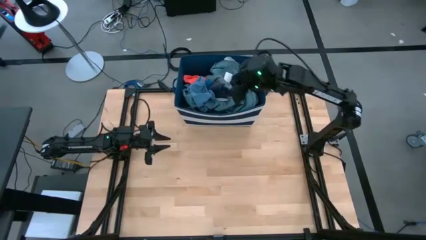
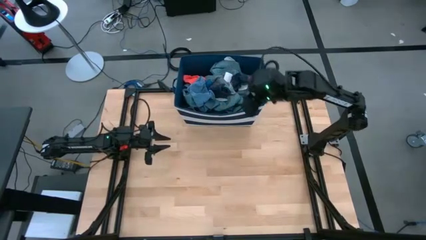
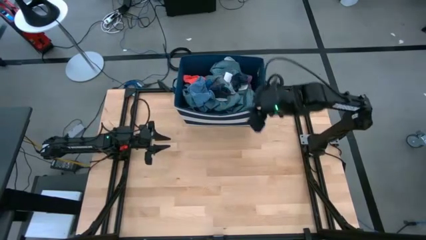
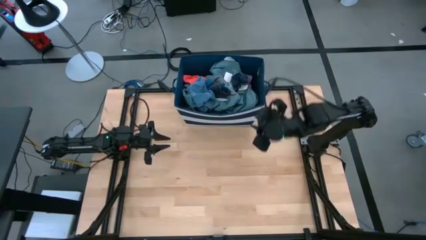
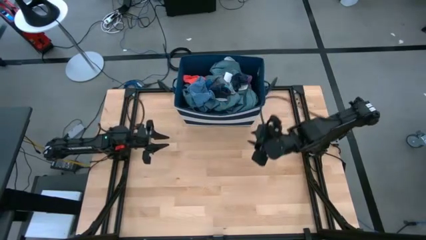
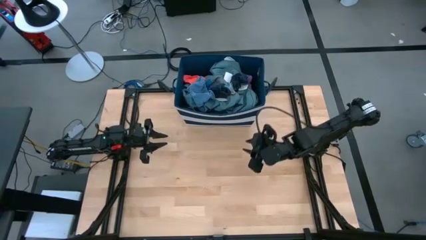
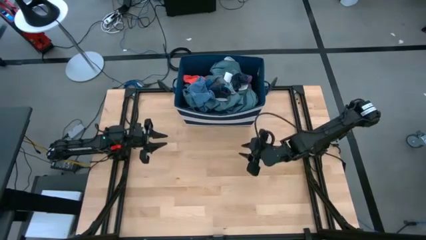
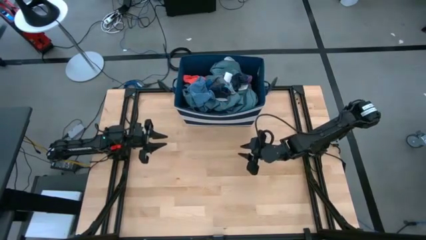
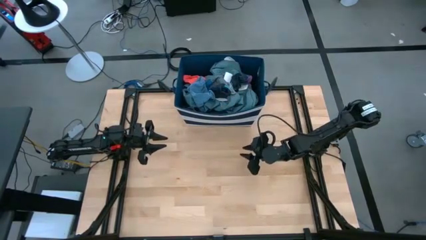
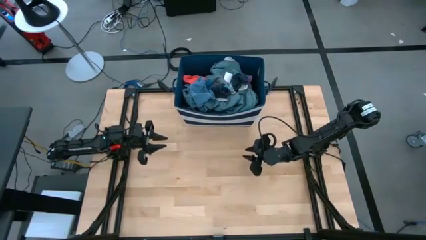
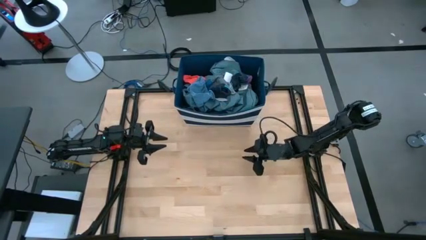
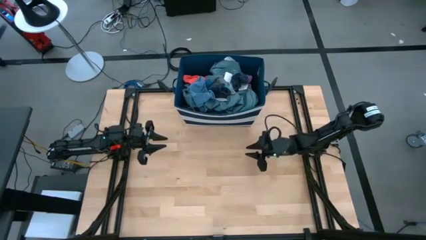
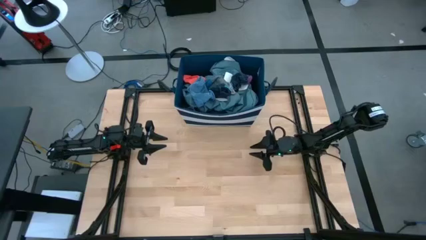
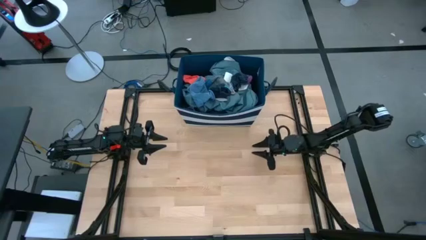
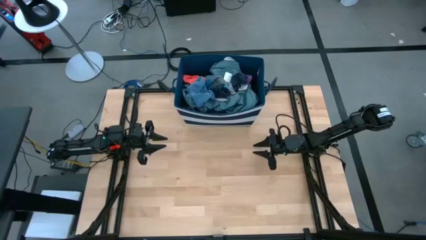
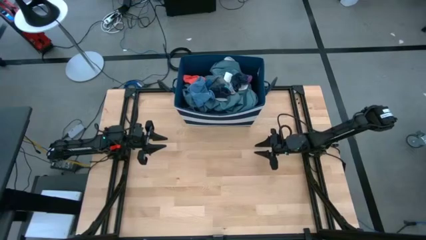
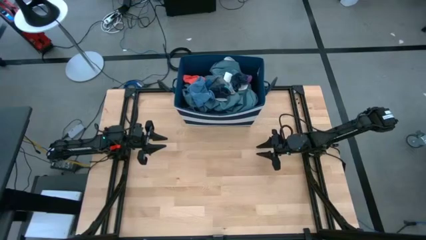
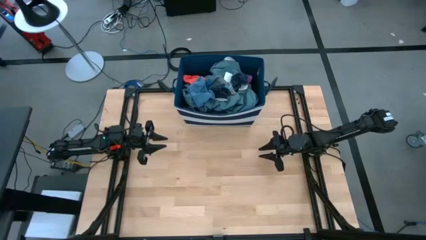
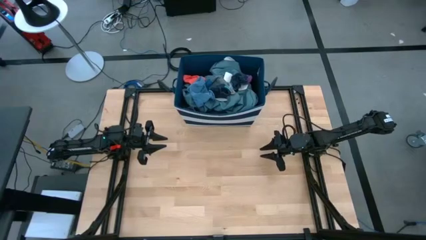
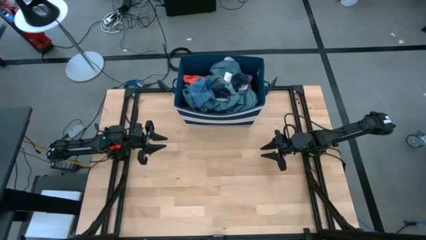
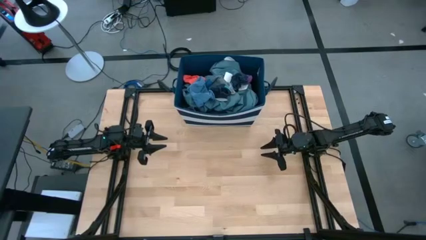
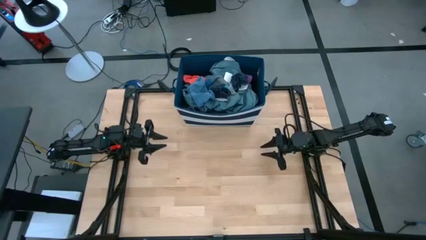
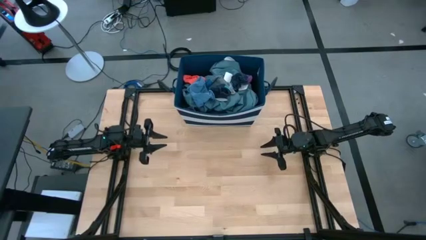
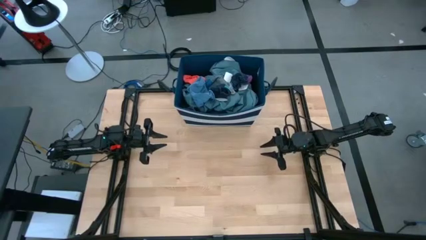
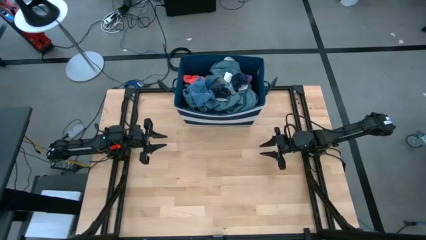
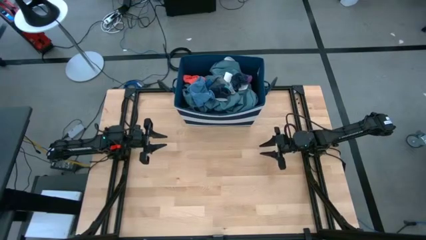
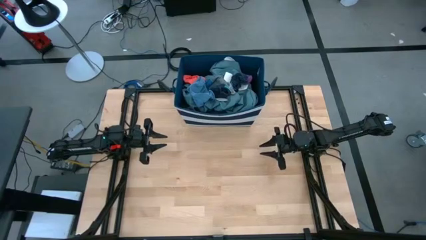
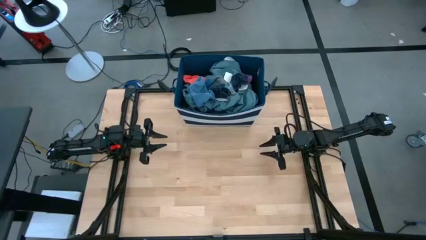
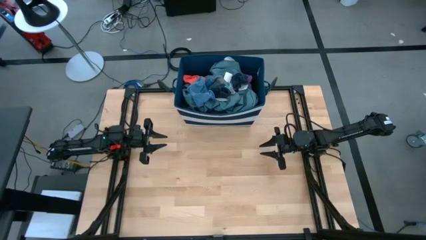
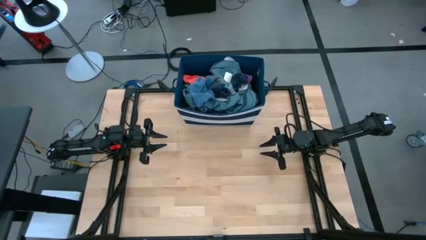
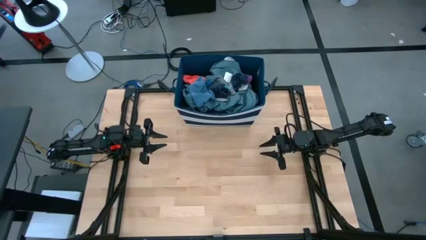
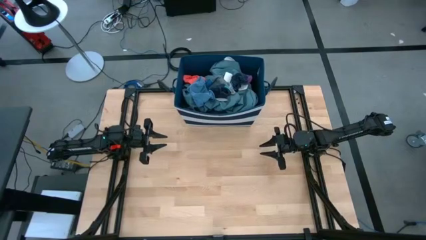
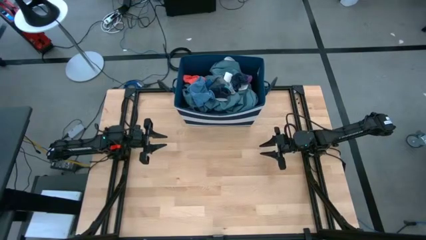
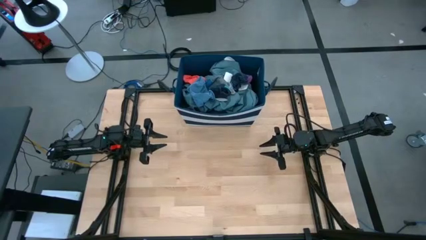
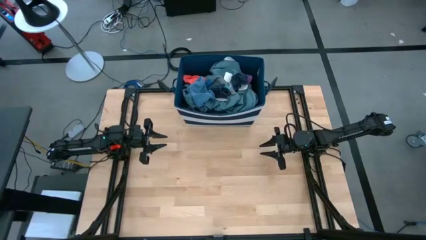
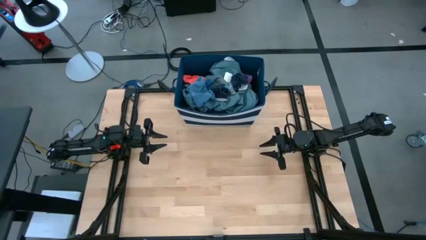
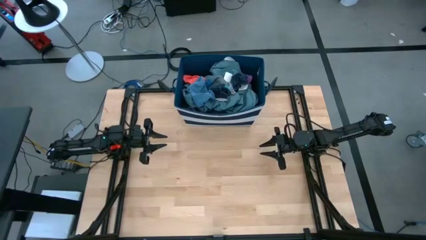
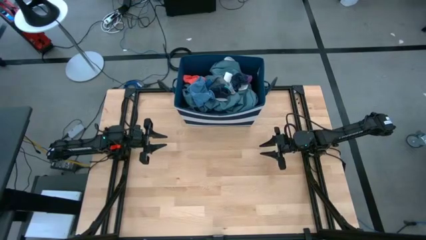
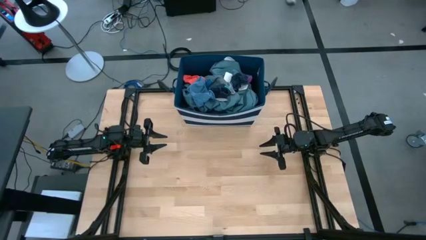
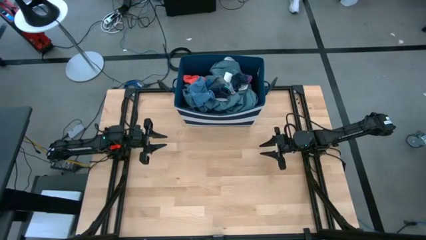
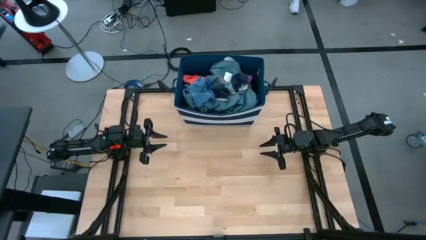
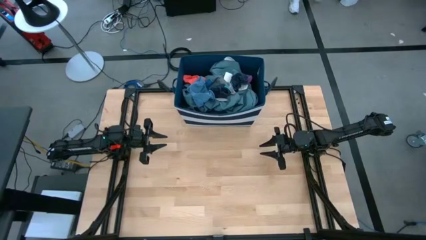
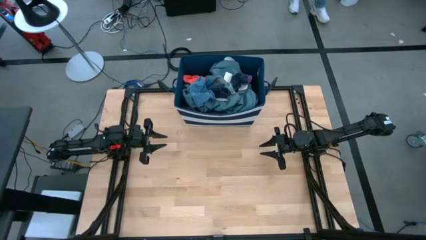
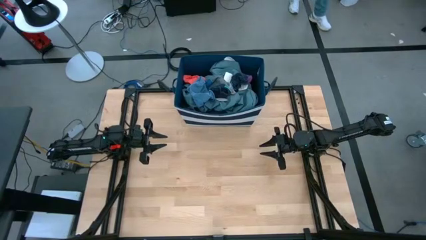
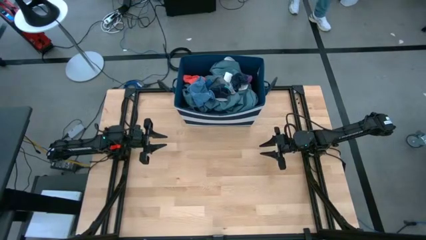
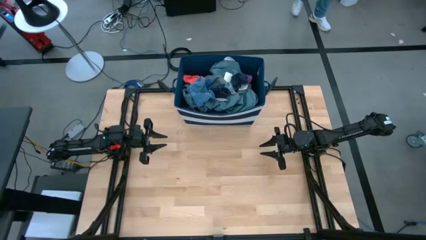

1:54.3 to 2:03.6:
Task: Sort clothes
Return to Home Position

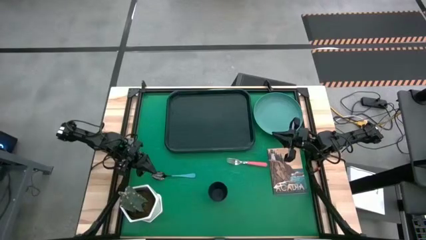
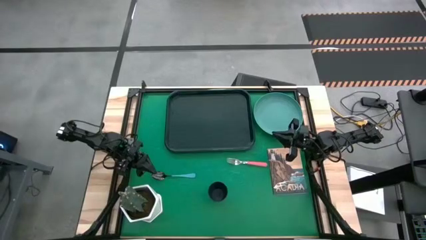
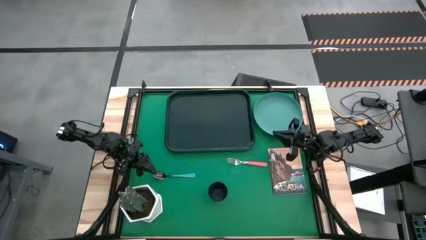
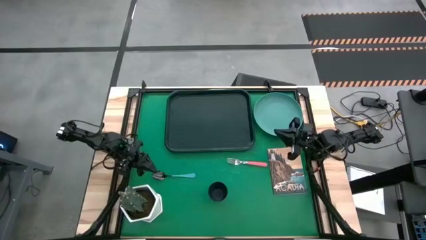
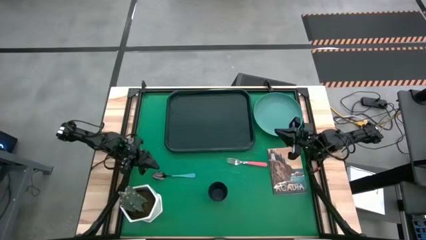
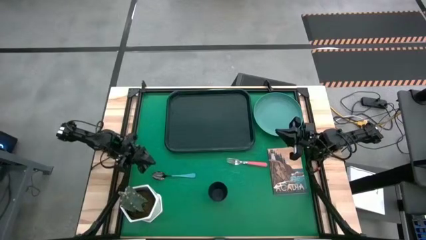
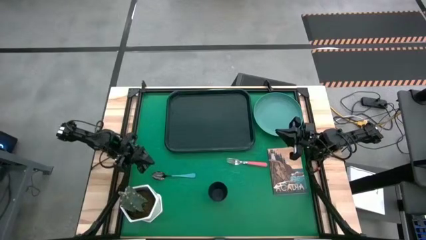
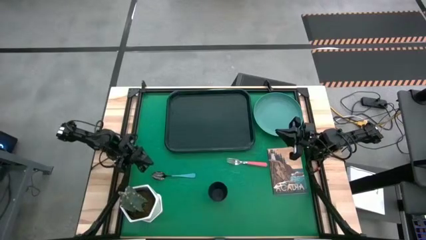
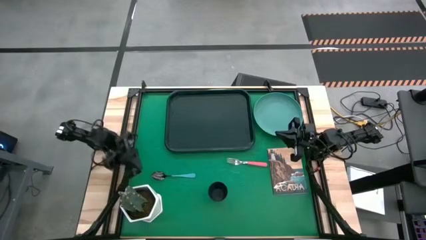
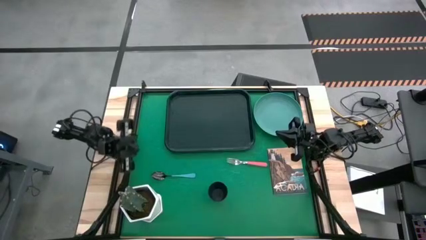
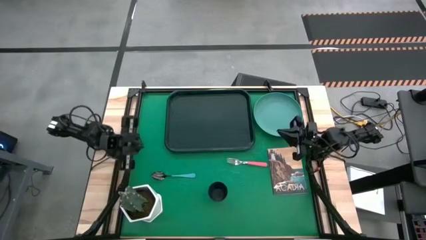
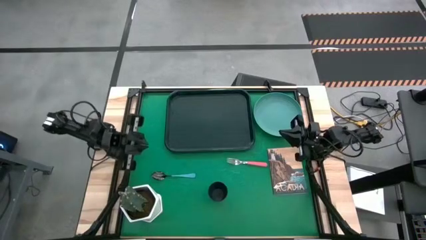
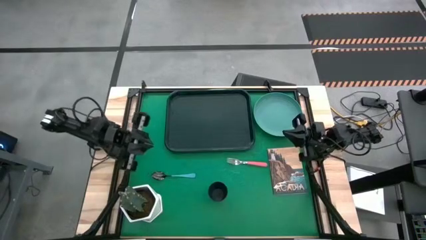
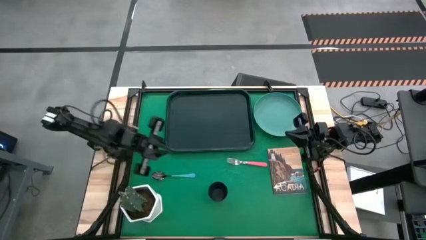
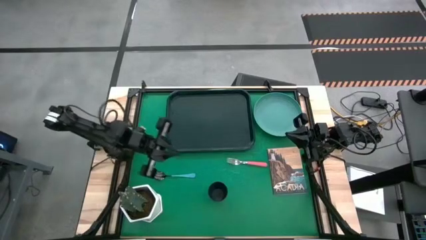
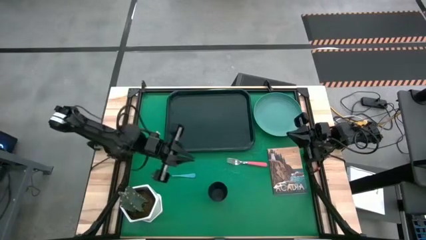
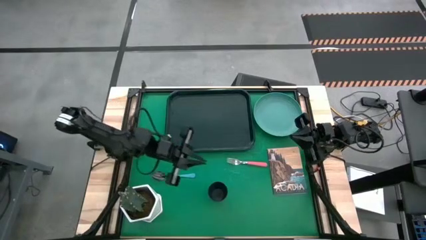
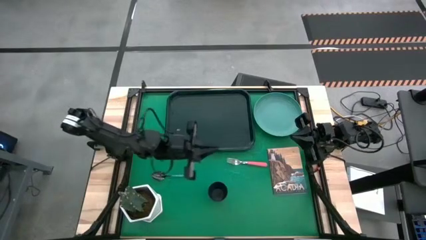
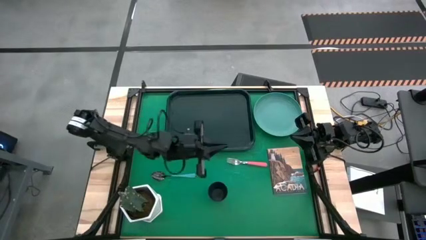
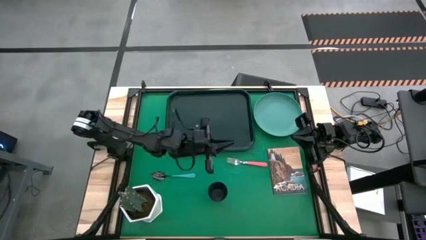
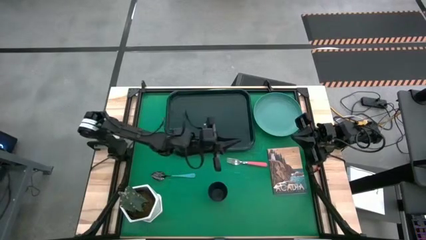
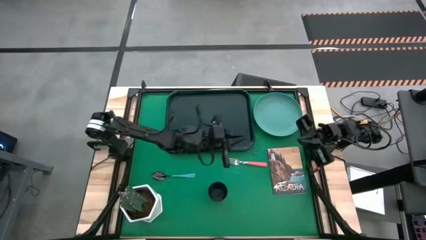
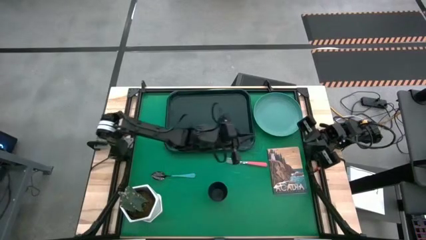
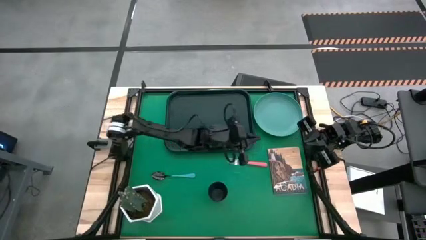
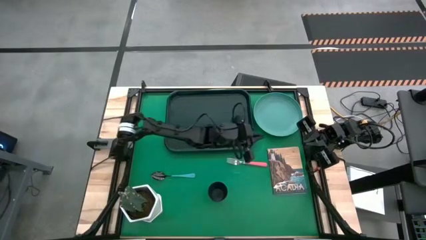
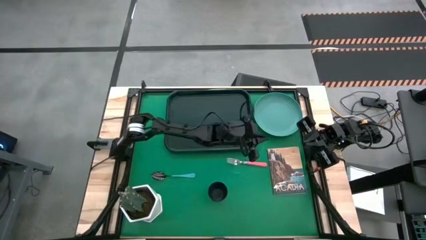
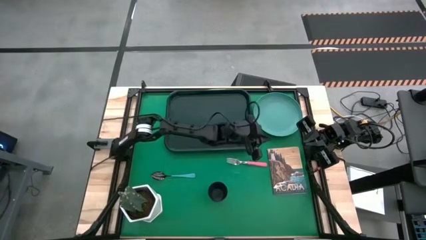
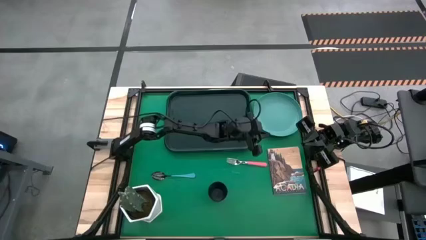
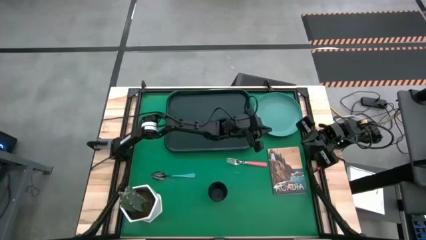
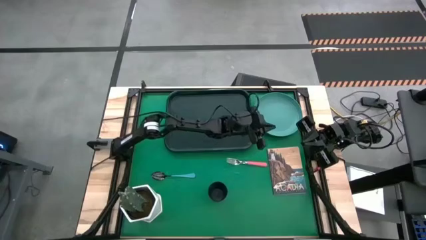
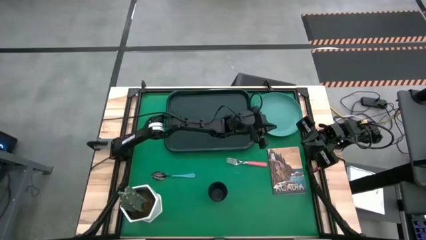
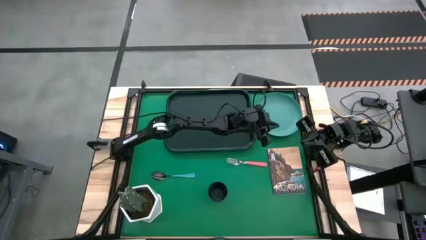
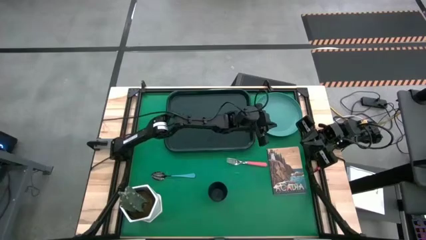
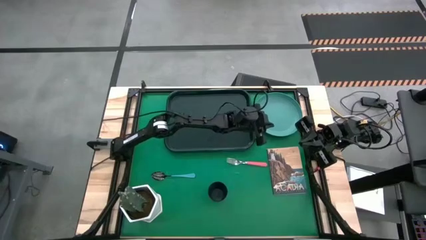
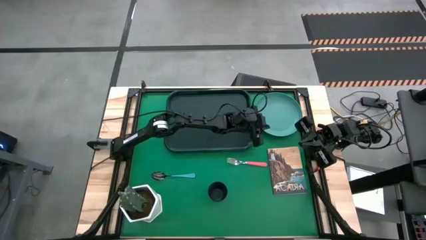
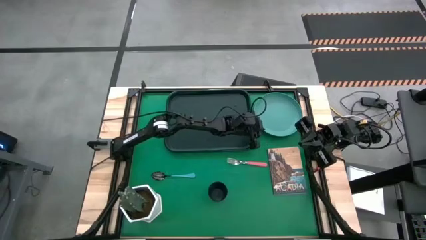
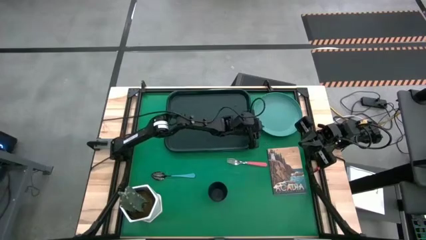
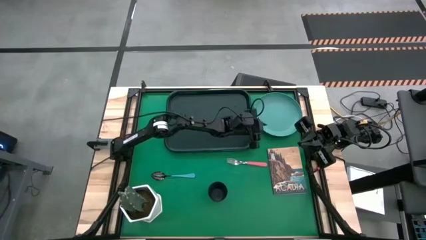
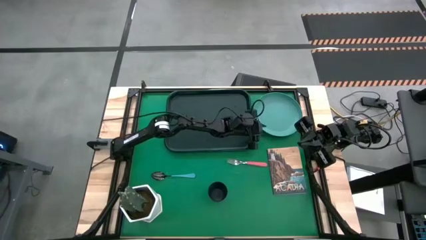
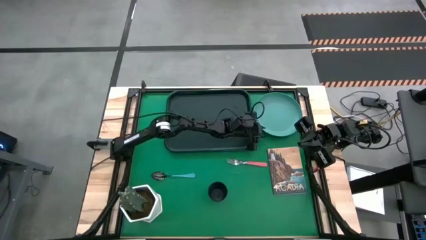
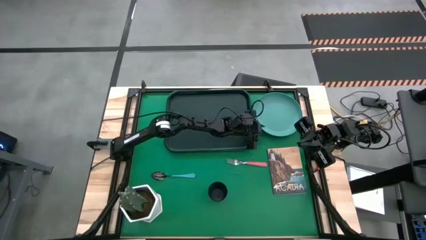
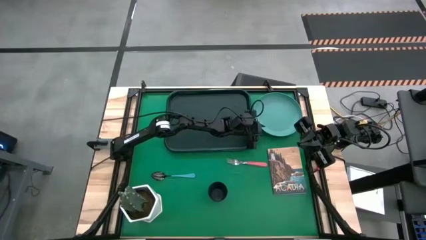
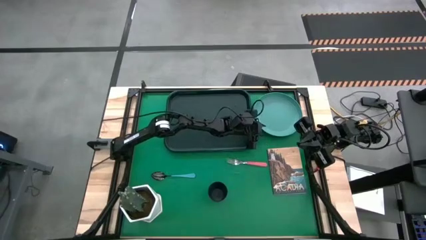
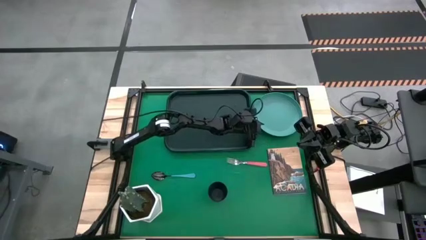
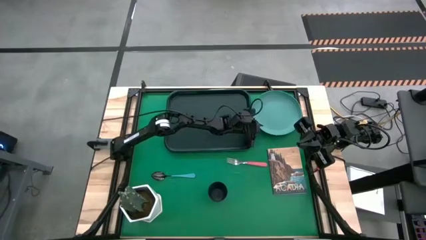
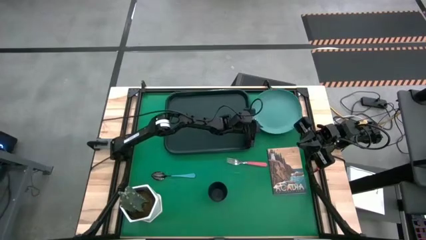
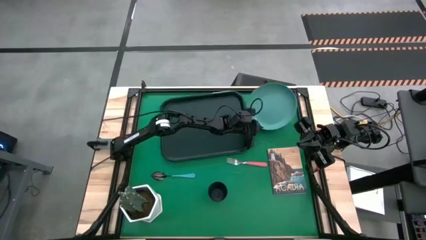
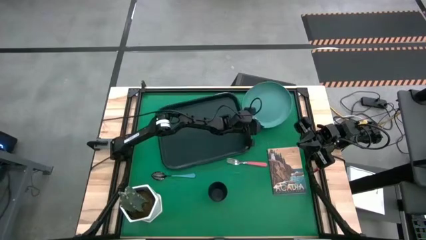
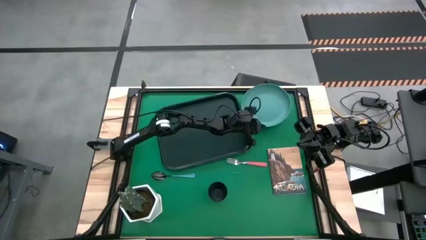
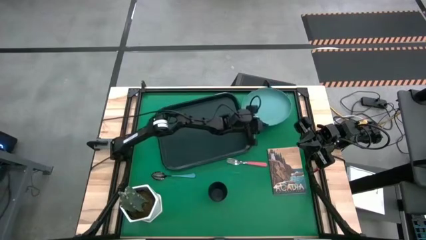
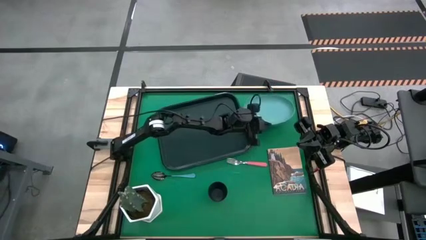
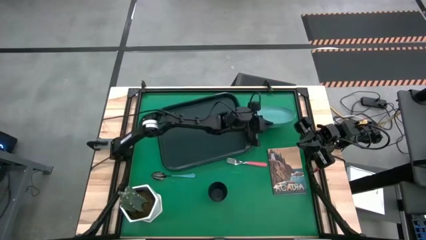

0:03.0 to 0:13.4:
Task: Pick and place plate/cup/fork/spoon on tray
Put the green plate on the black tray
